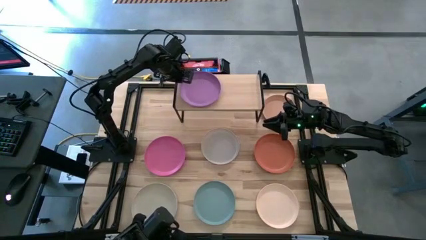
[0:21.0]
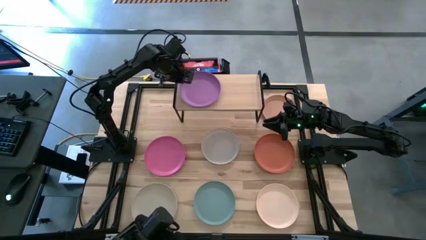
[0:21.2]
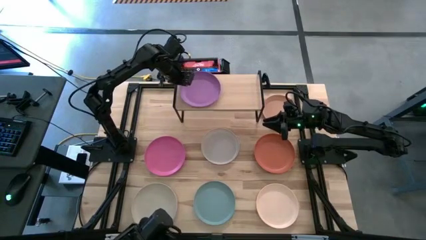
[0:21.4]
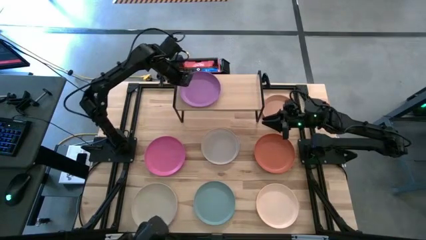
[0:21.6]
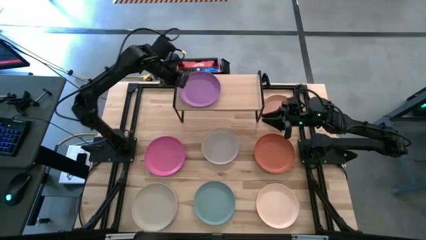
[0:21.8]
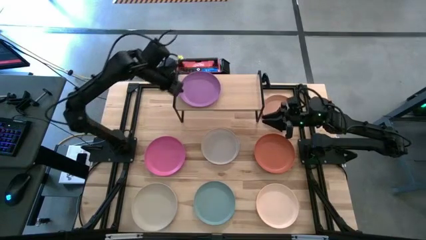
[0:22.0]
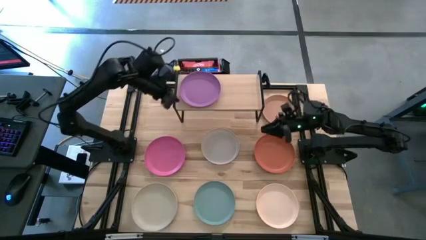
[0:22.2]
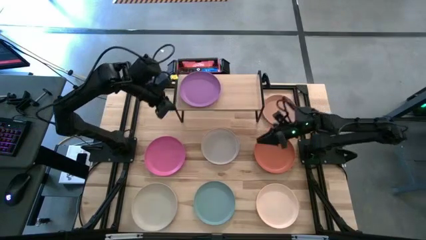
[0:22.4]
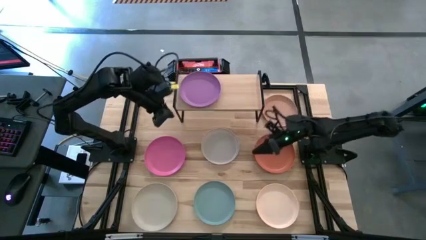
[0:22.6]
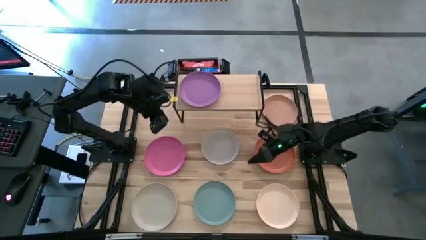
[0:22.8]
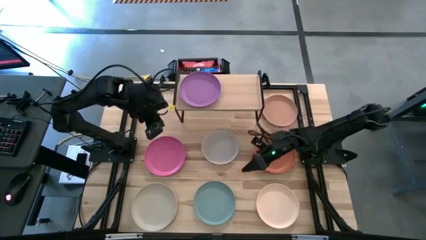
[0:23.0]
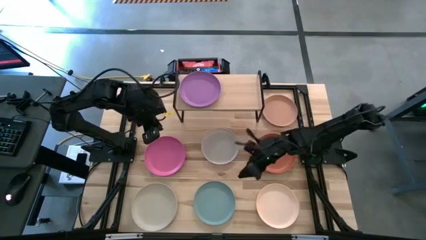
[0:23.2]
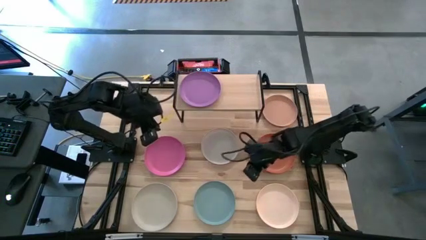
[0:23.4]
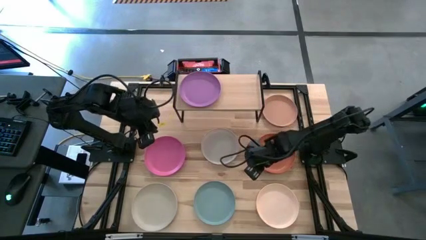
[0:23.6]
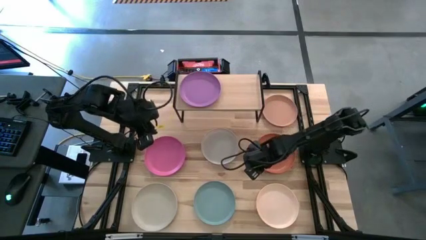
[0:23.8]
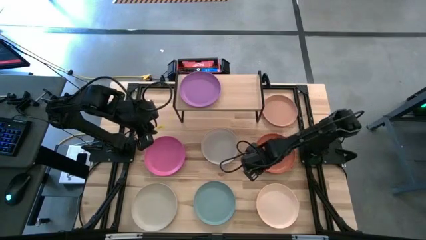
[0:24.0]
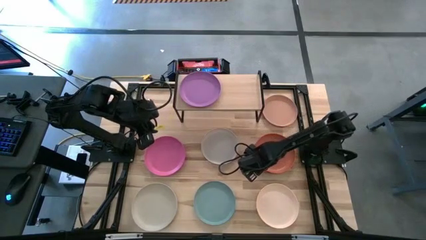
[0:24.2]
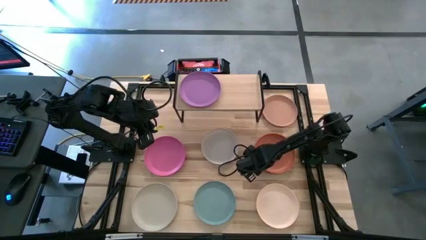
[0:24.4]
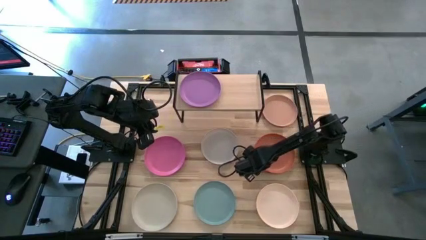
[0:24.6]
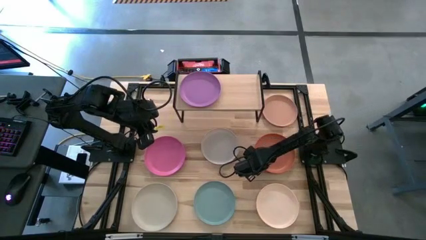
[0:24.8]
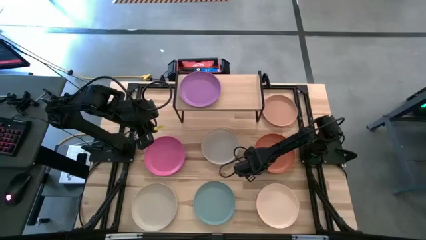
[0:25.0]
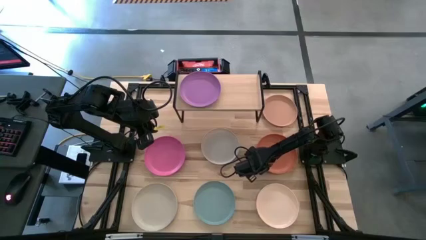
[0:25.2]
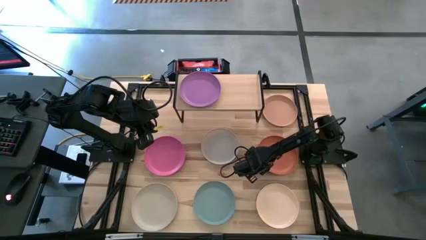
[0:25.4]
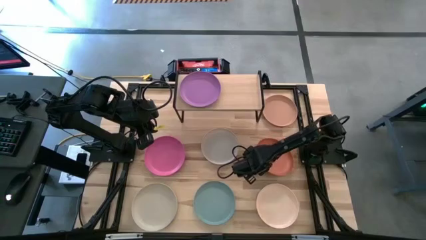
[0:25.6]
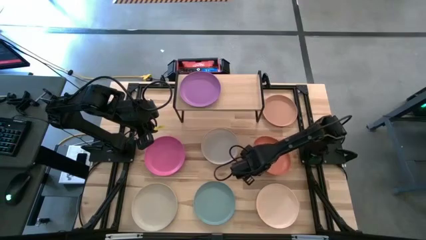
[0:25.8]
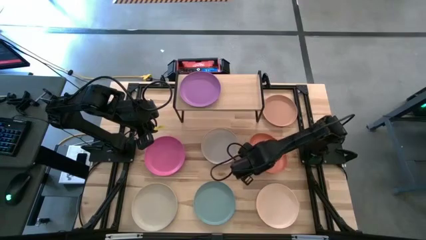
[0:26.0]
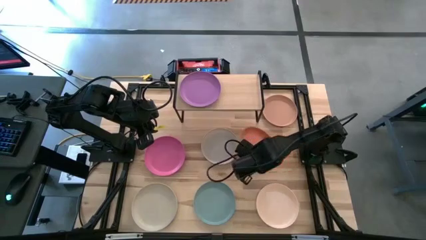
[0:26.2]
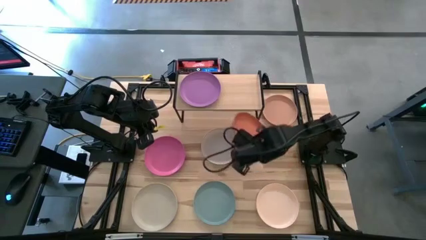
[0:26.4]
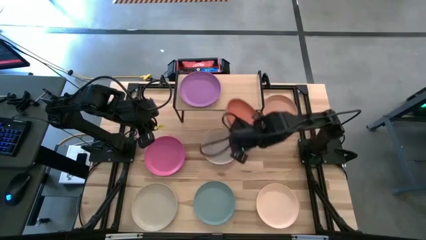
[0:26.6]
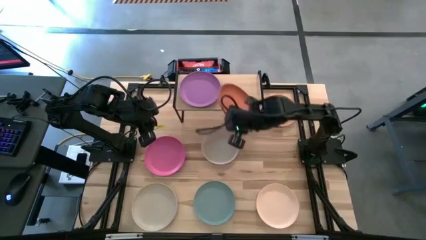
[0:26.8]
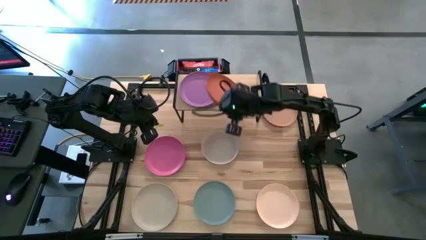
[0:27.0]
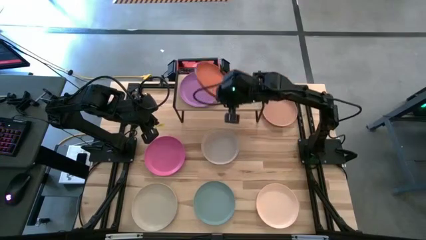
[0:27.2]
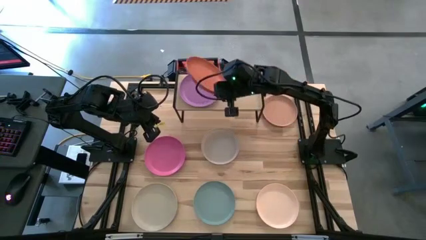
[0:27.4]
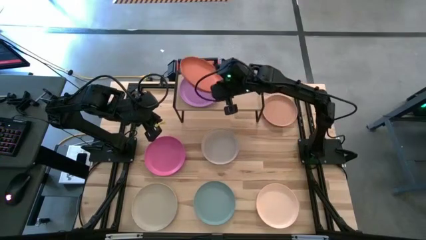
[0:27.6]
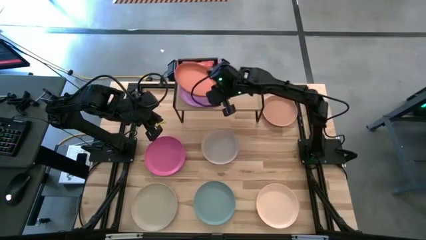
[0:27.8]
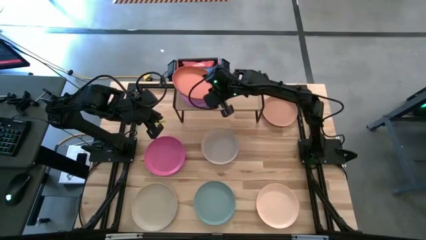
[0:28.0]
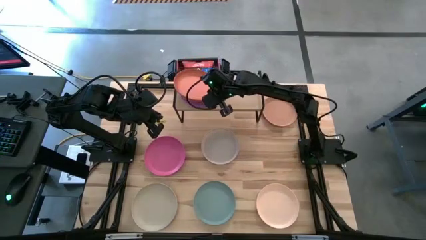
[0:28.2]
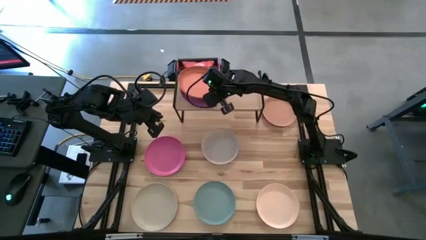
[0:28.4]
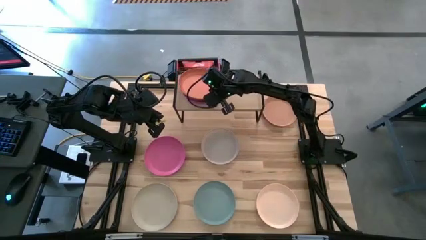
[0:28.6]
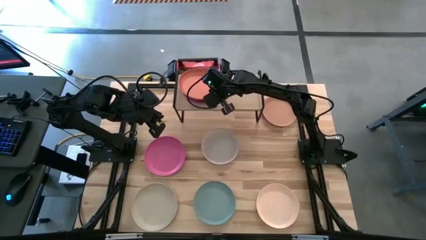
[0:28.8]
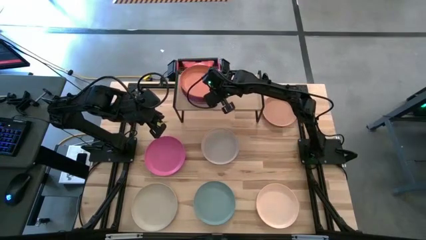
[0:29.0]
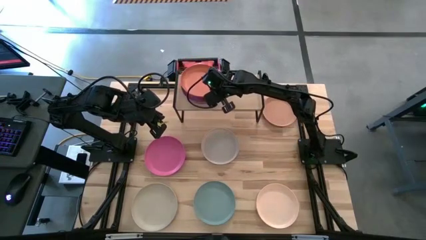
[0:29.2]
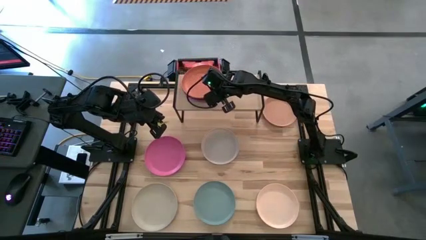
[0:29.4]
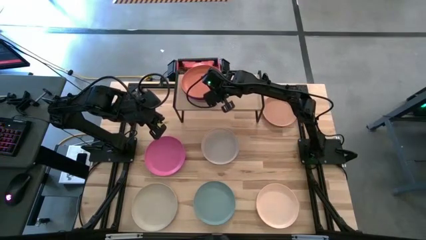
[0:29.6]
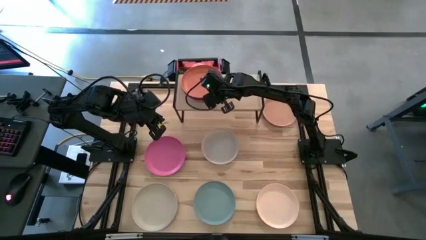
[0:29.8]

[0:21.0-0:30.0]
Task: Place and stack plates onto a shelf
Stack the orange plate on top of the violet plate on the shelf

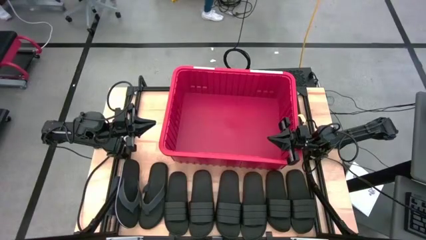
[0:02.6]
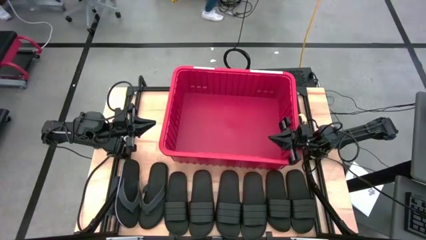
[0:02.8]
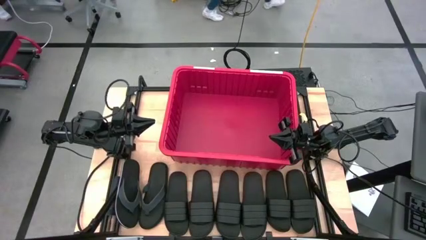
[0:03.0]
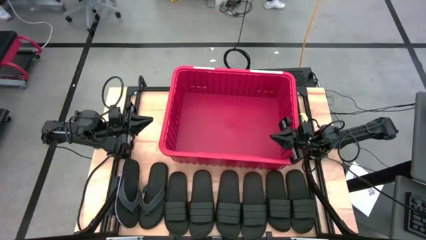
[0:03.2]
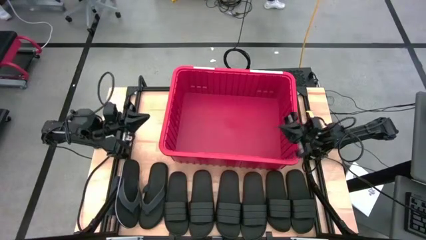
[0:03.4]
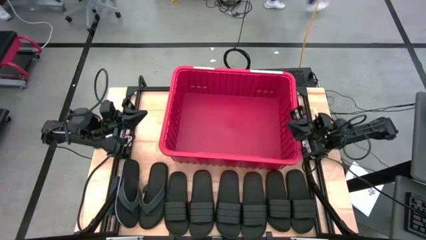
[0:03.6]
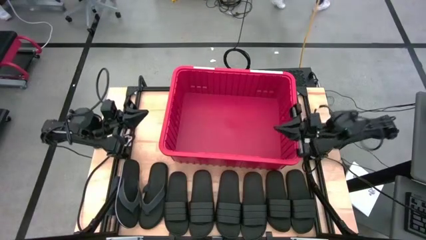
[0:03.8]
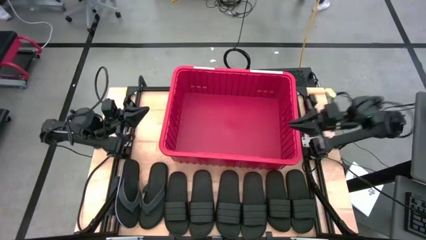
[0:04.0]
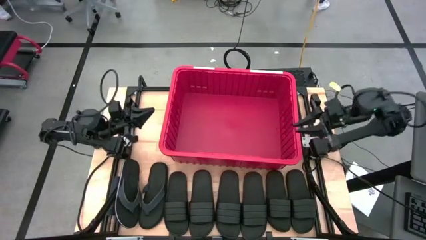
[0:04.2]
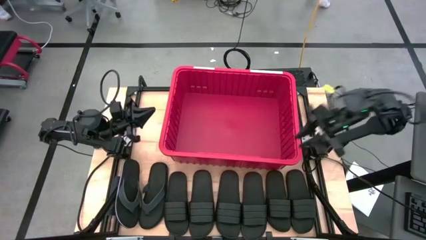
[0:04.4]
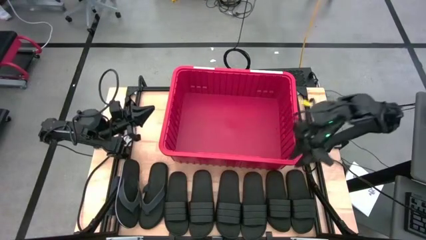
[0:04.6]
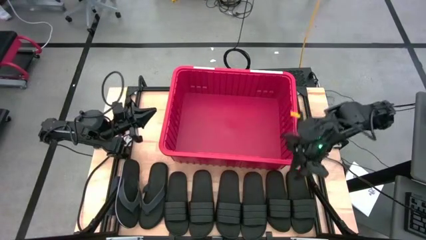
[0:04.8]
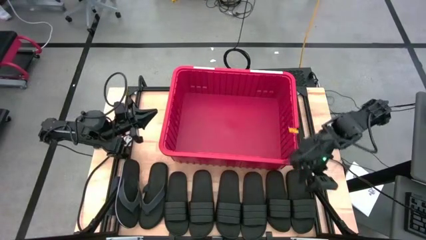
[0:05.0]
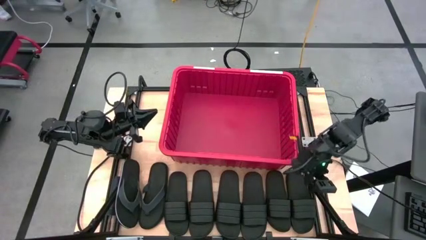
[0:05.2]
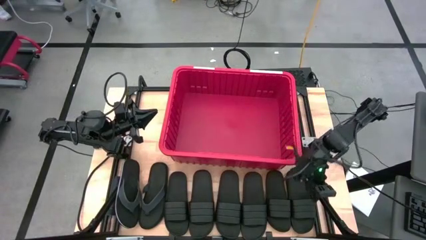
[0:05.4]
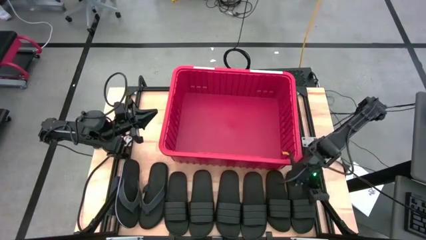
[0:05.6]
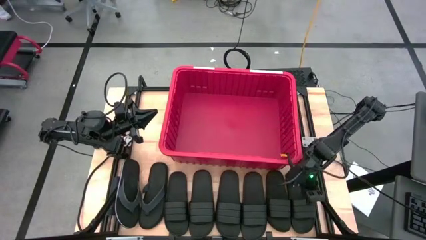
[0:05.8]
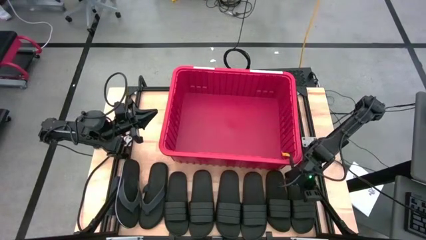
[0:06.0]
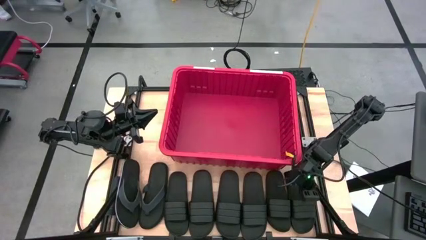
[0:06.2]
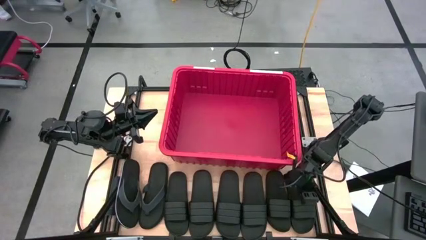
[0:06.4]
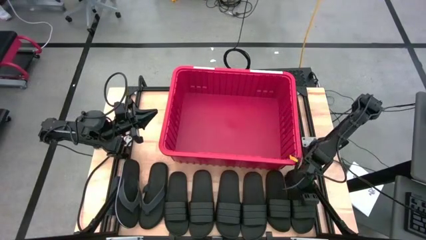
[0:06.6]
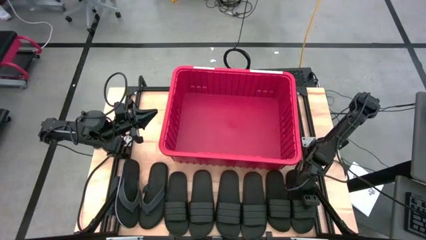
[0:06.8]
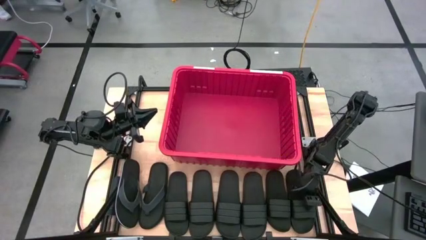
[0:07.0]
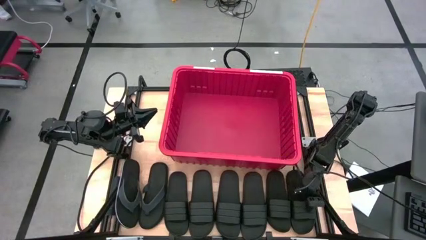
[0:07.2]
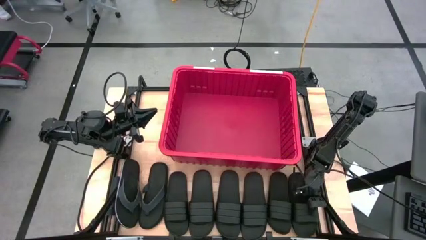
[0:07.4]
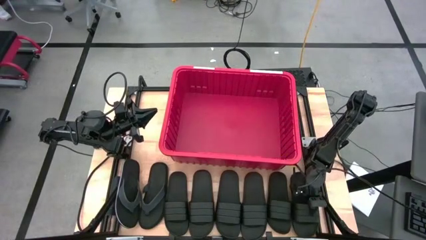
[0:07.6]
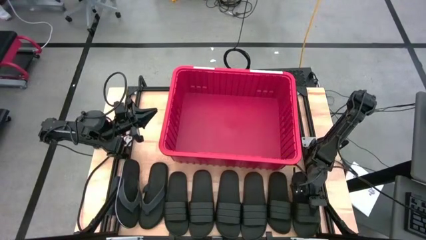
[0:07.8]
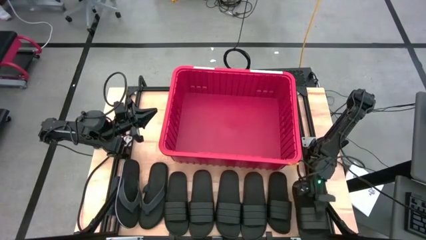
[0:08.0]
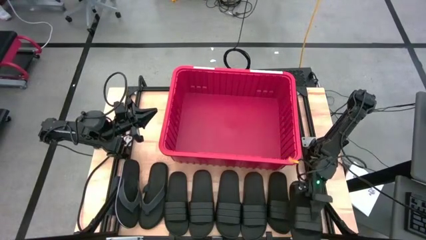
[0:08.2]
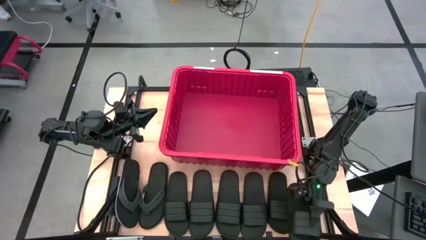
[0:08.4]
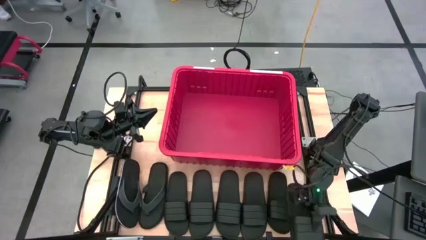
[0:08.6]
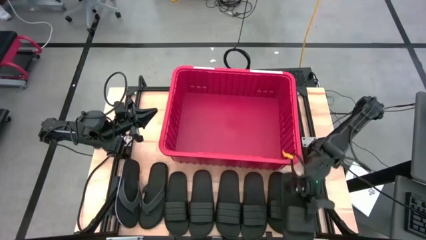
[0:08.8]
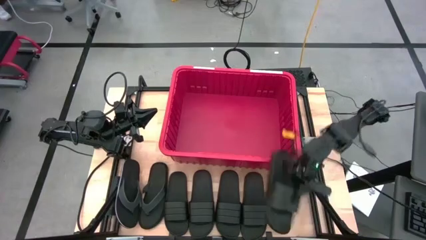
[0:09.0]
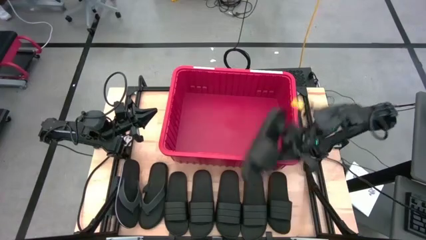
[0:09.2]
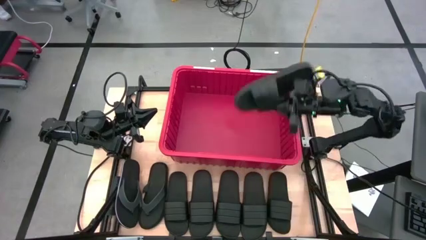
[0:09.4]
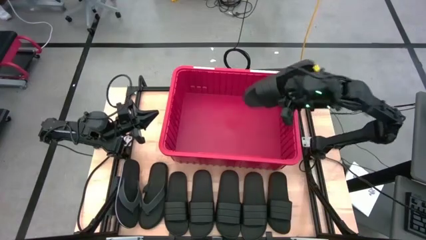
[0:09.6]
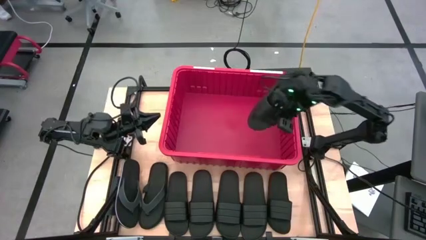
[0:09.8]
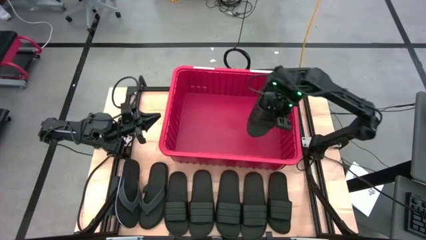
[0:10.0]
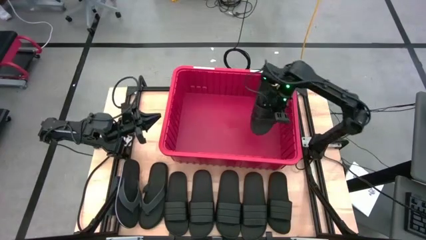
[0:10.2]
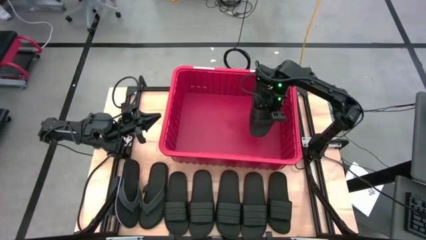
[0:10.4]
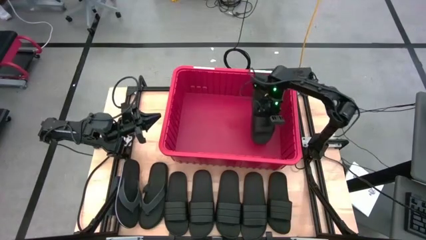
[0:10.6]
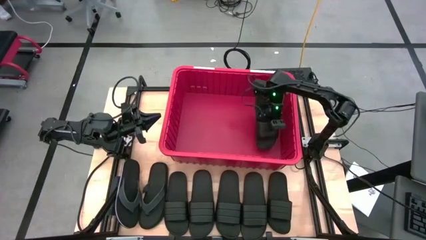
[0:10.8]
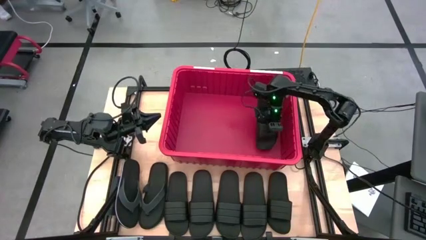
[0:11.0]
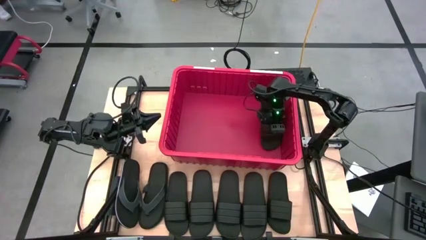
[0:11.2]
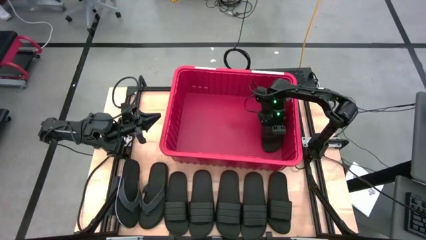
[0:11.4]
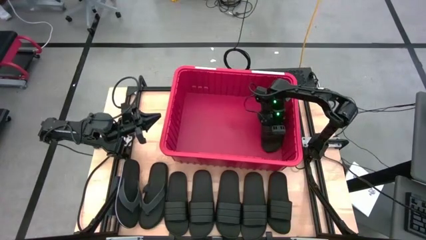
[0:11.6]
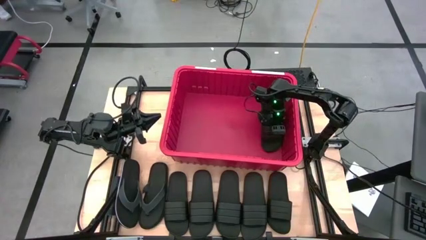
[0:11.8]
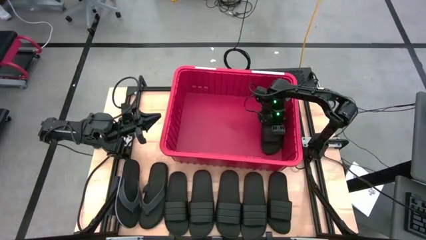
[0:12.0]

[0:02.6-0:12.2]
Task: Pick and place slides into bin
Put the black slide into the bin
